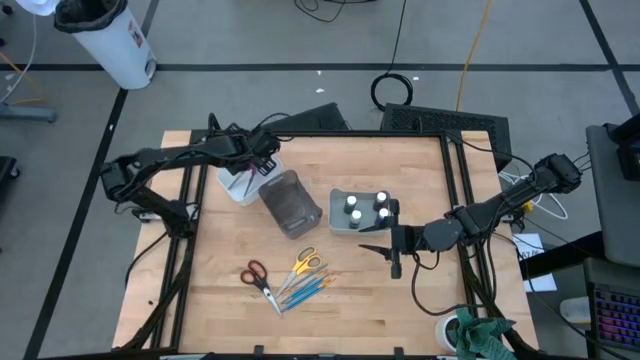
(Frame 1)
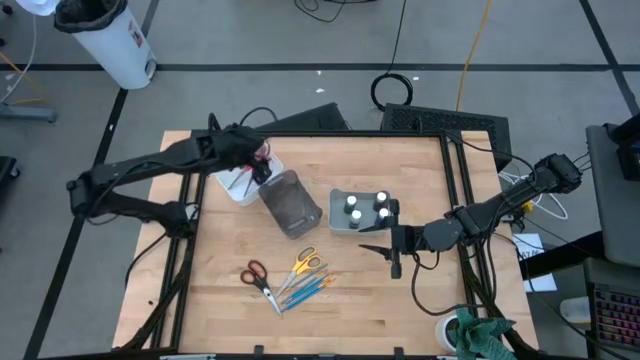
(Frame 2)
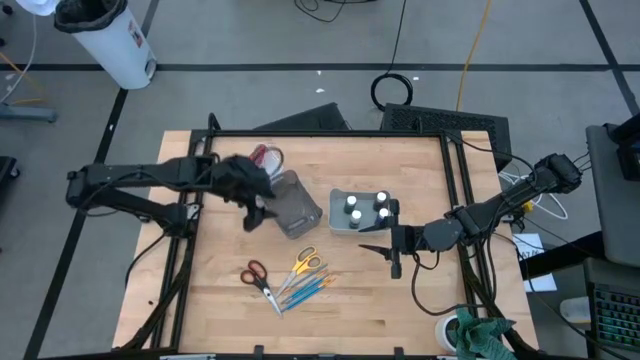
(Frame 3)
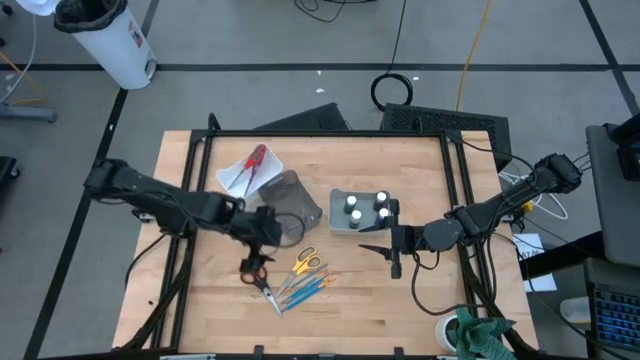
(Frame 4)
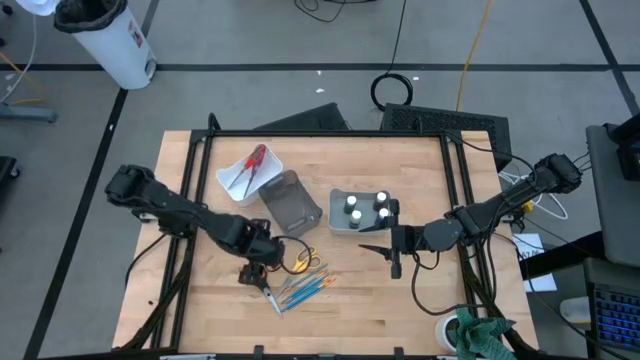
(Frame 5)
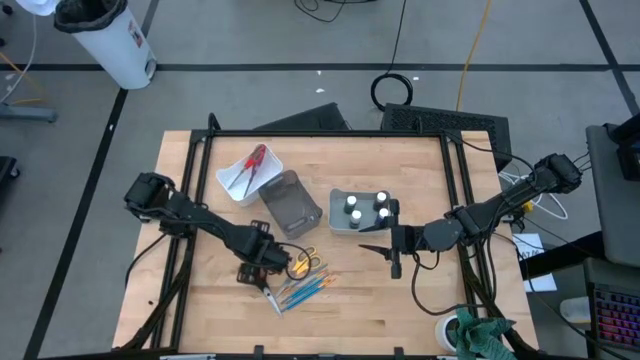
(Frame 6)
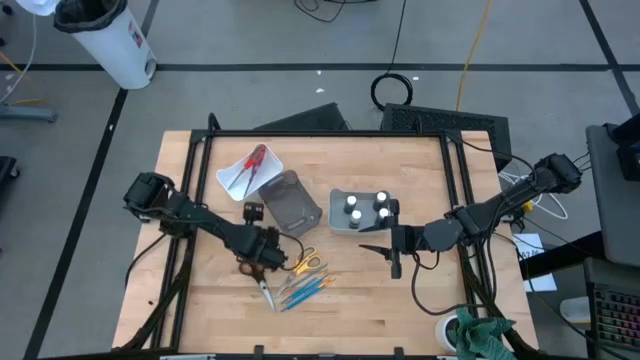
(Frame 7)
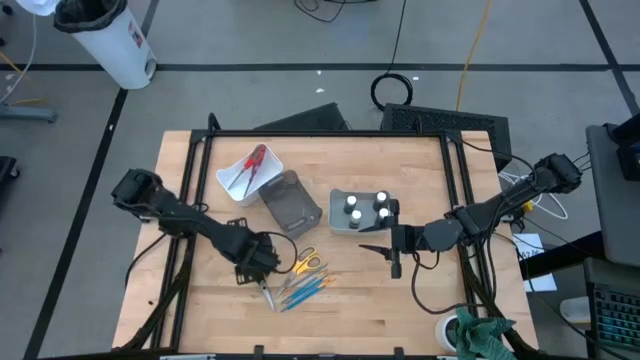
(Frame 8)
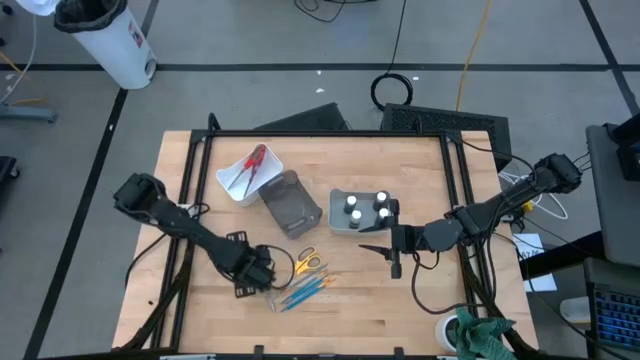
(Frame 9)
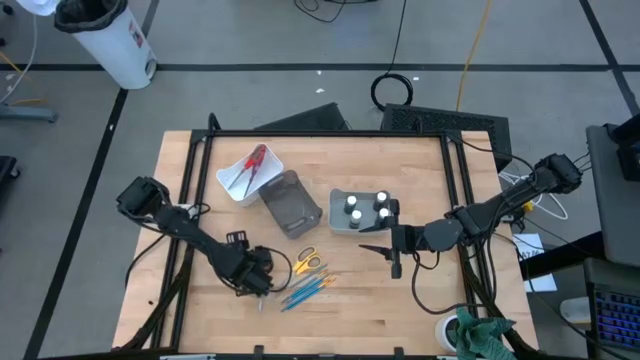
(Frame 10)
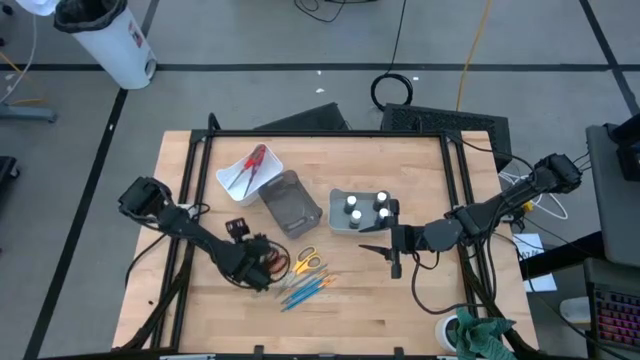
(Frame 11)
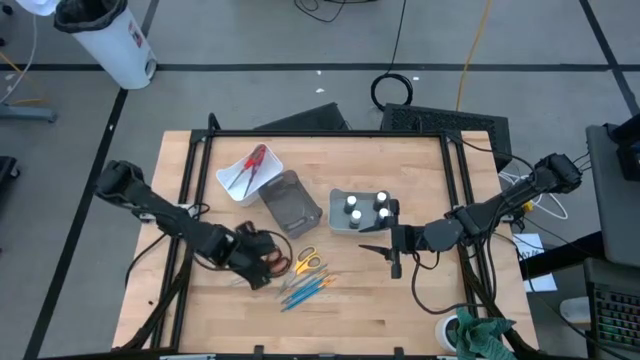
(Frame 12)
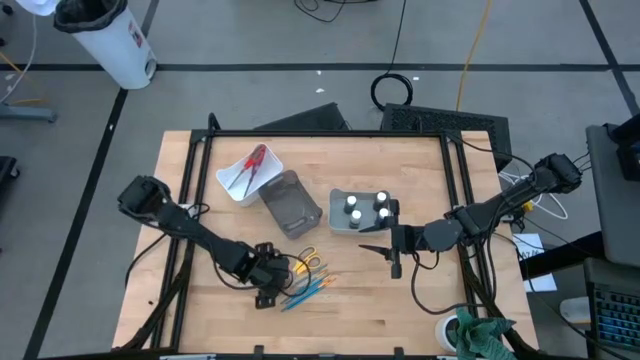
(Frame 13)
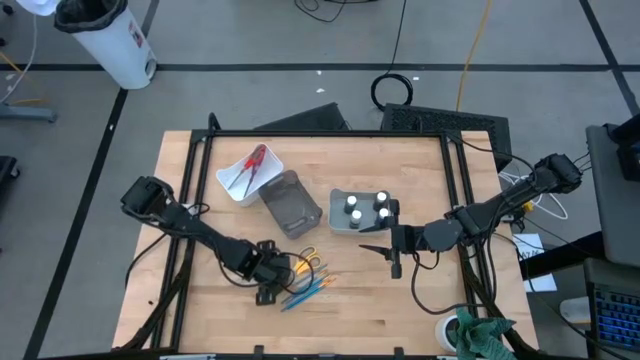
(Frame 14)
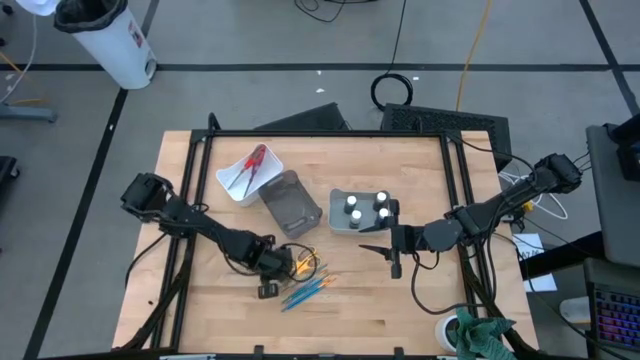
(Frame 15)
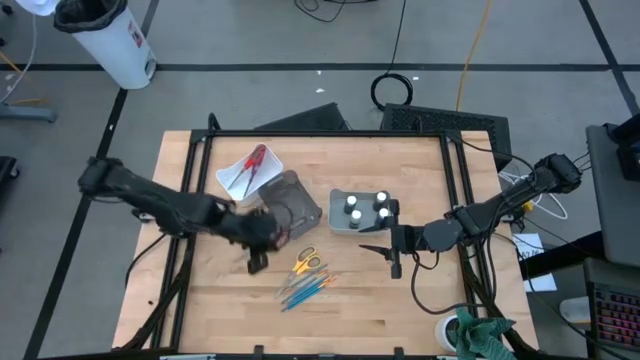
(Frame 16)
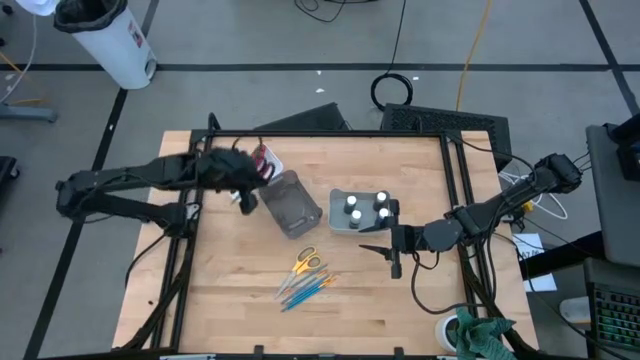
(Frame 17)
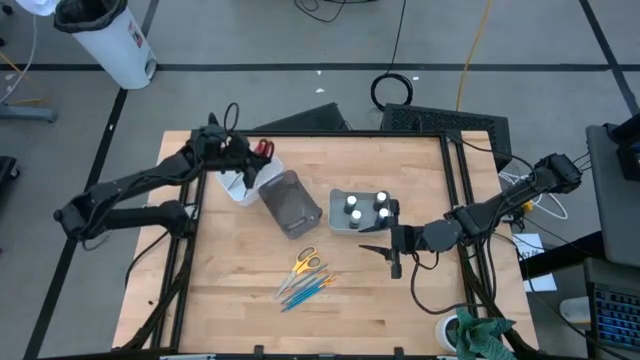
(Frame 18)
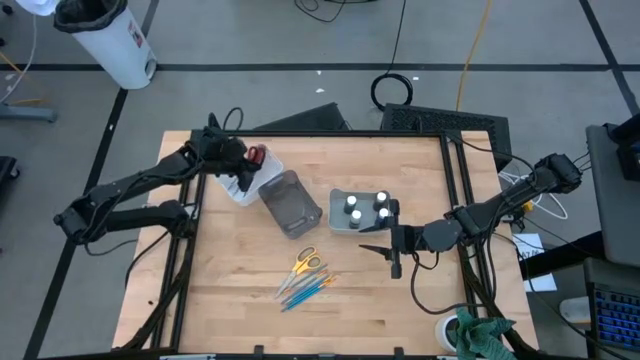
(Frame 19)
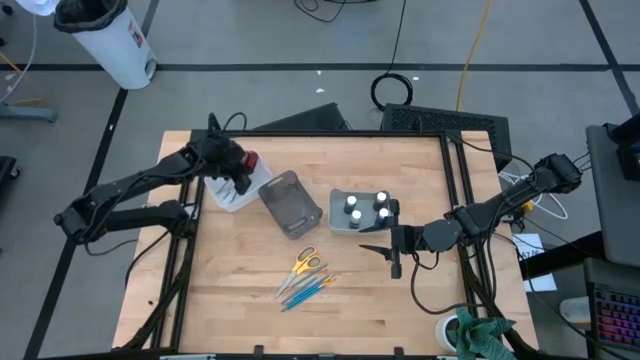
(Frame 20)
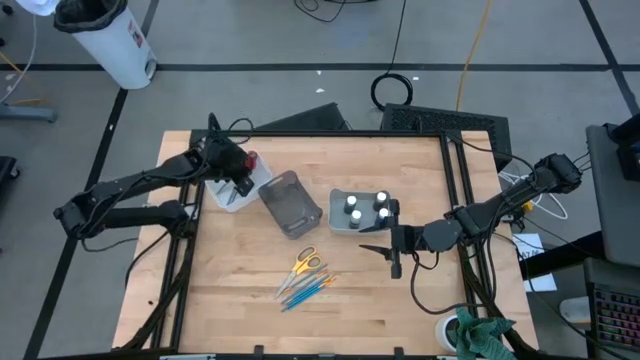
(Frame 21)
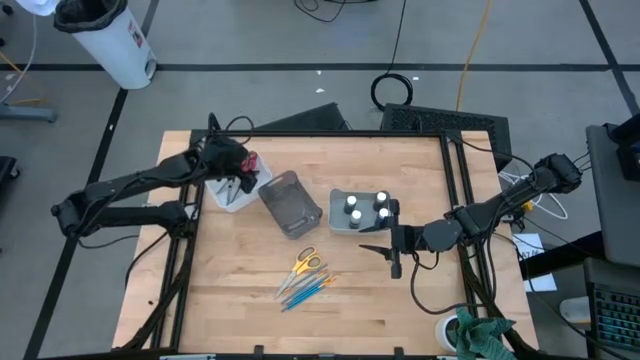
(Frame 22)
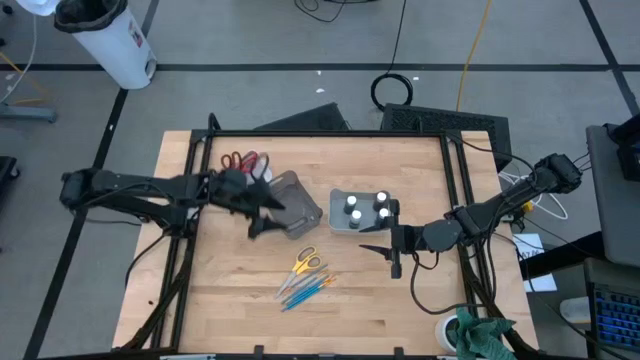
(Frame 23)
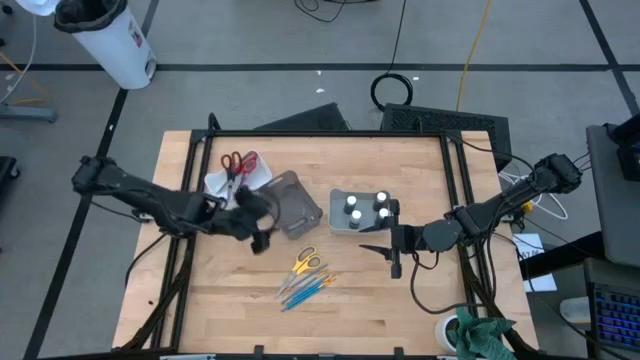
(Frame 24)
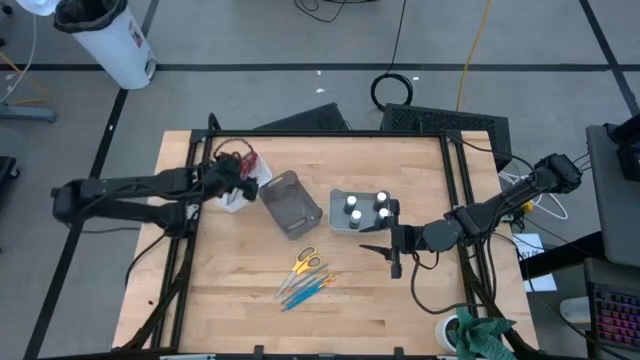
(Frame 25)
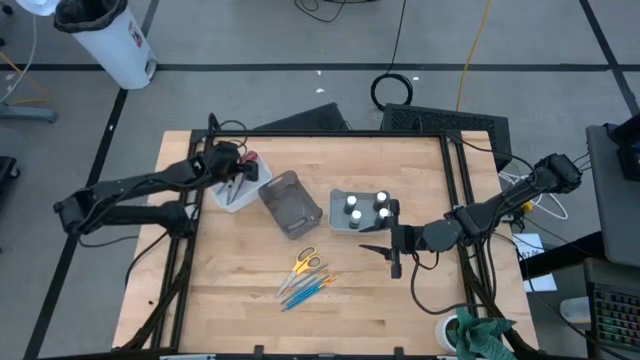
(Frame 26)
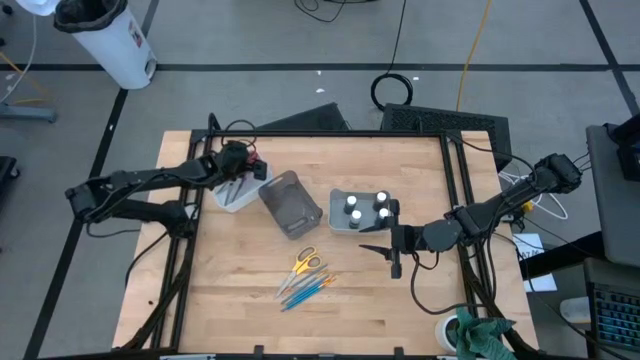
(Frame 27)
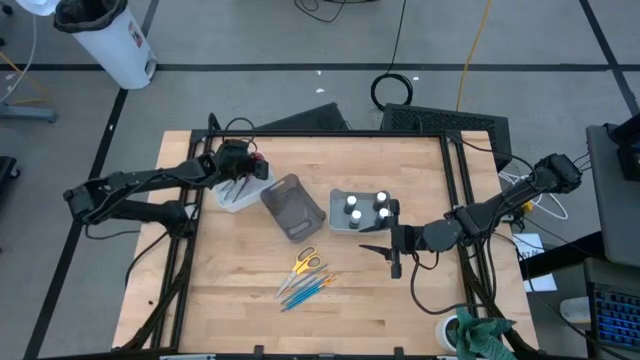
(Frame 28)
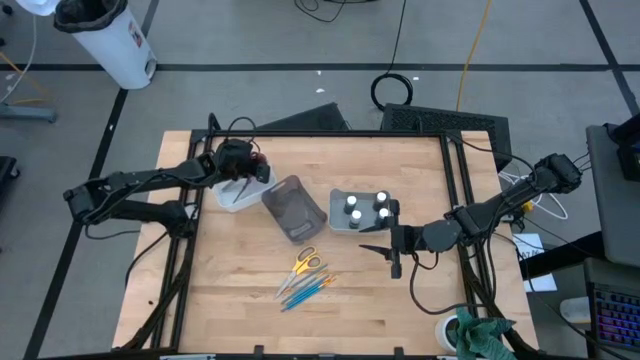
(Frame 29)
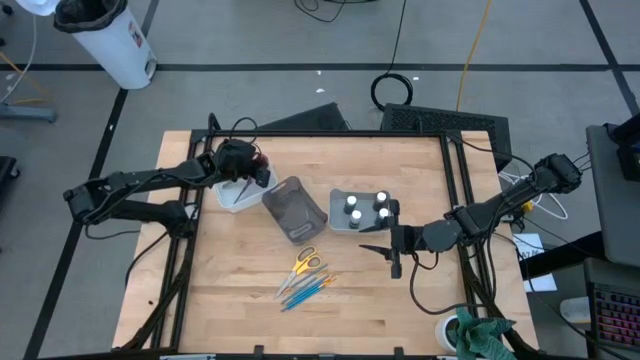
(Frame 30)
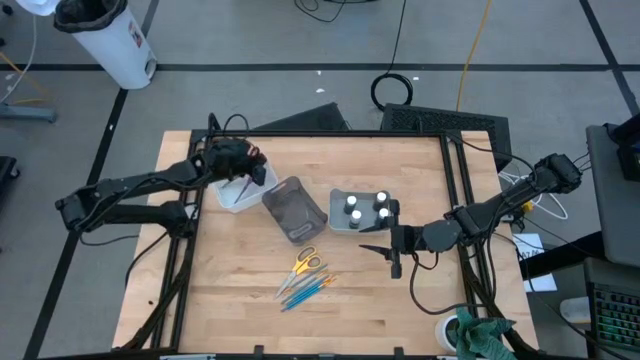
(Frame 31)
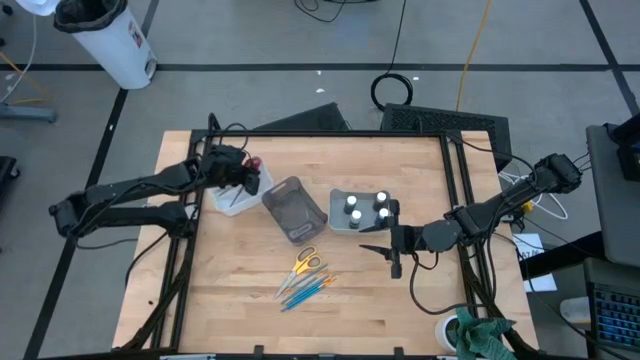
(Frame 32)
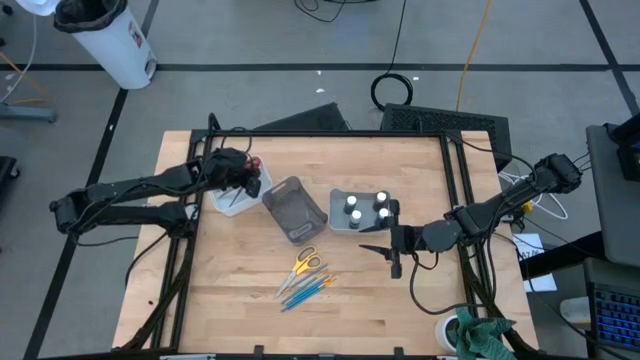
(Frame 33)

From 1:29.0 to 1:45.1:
Task: Pick & Place Paint Supplies
Put the black scissors into the white bin

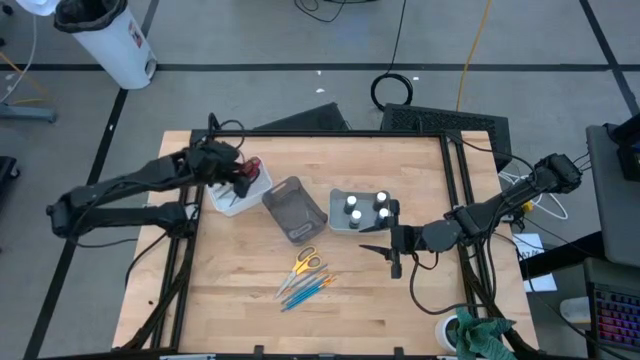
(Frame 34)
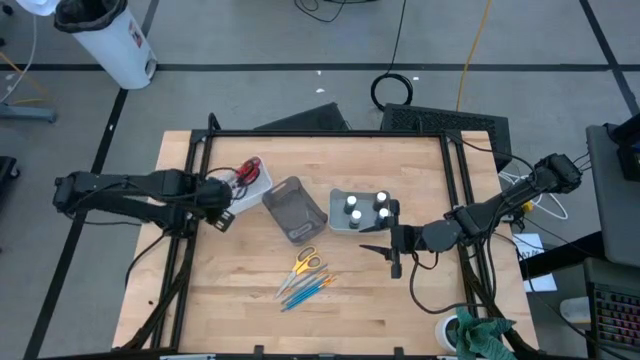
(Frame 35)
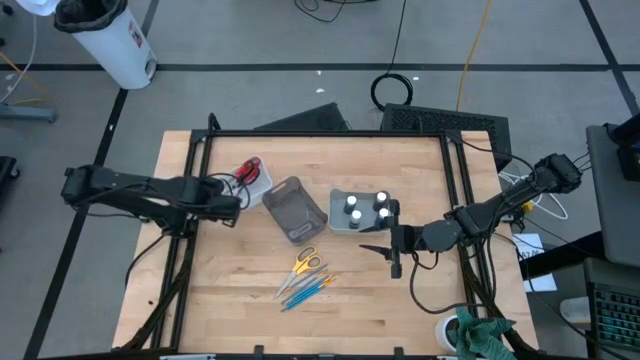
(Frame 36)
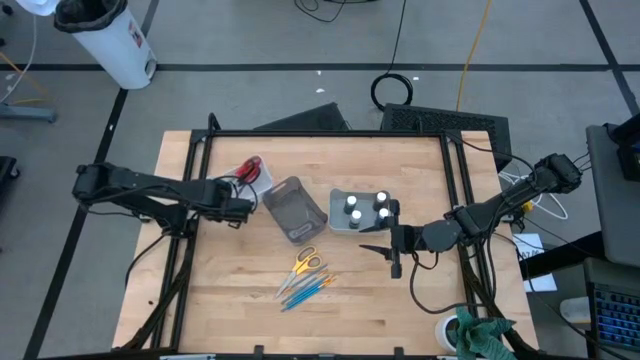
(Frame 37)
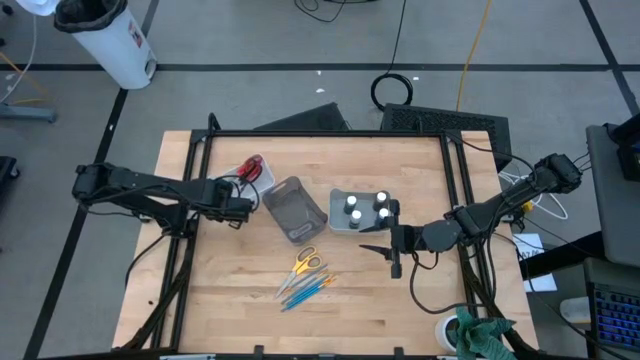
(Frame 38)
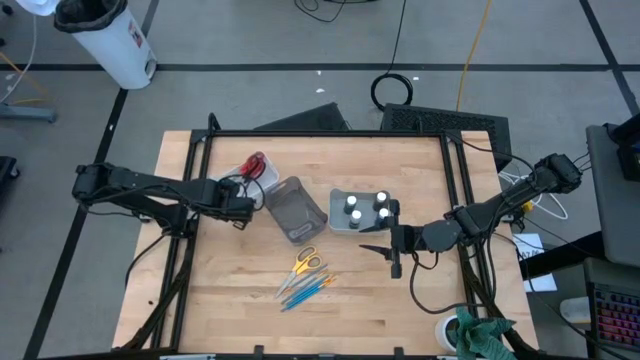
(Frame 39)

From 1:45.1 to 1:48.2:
Adjust the white bin

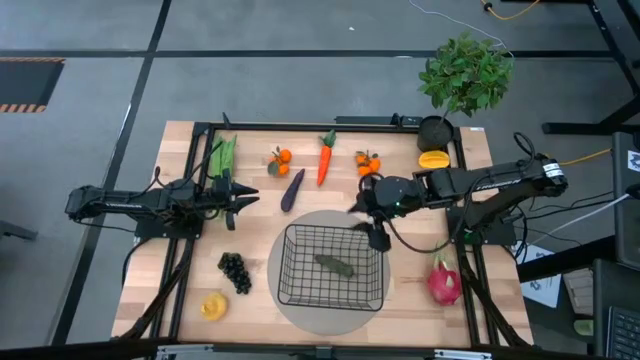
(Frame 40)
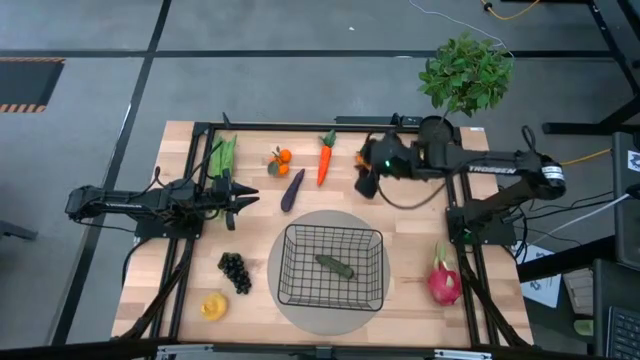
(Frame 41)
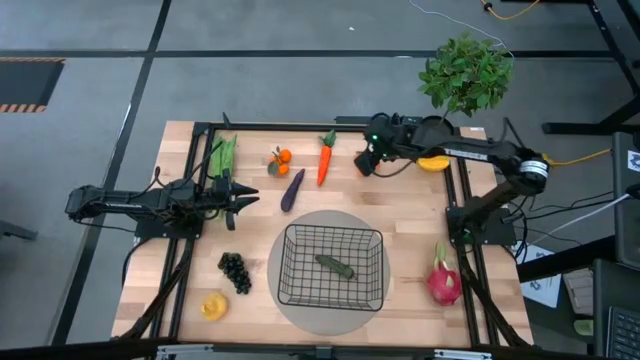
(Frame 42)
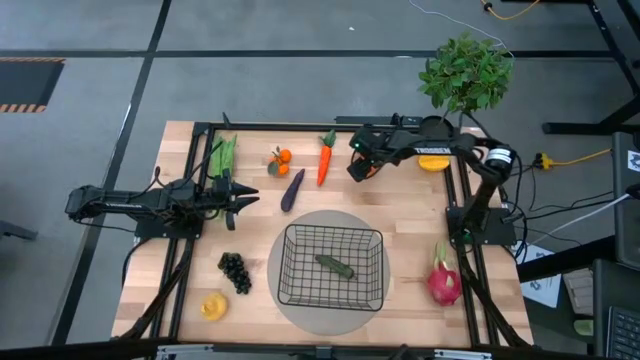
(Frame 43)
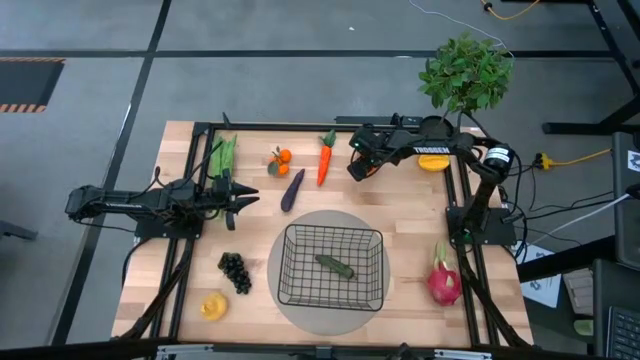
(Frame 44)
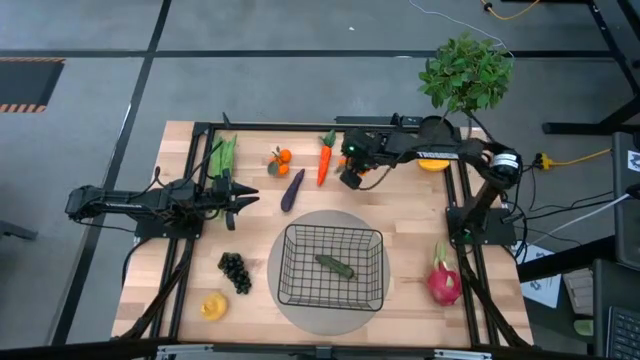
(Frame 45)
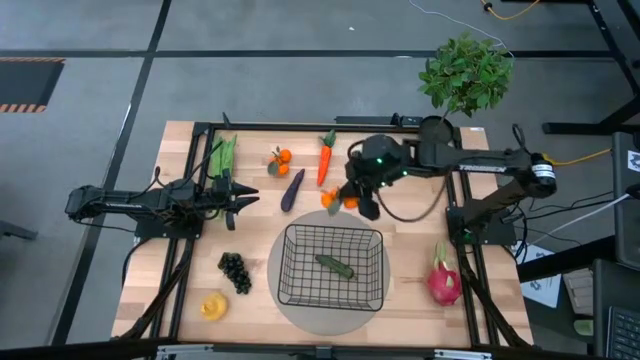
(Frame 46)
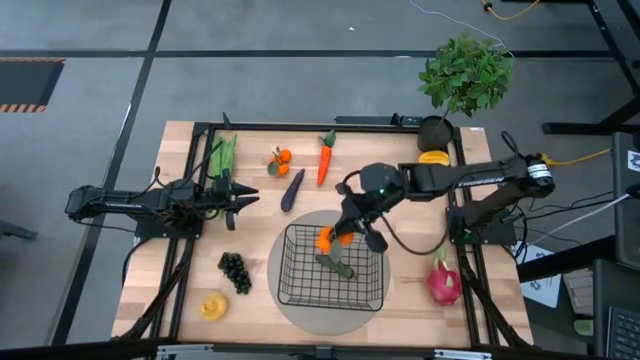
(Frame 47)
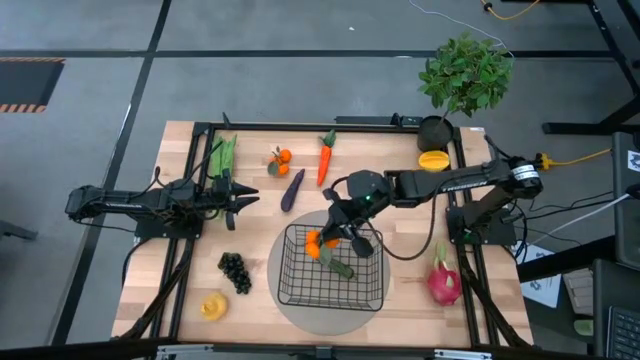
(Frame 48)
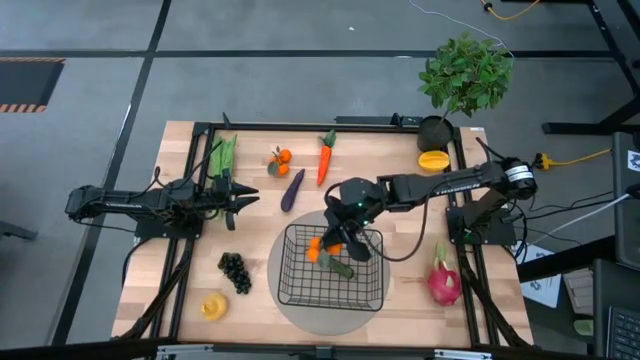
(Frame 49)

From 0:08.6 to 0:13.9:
Task: Build produce basket
Put the right oranges into the black wire basket
